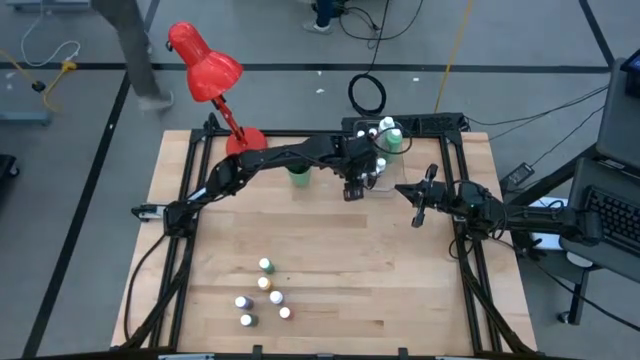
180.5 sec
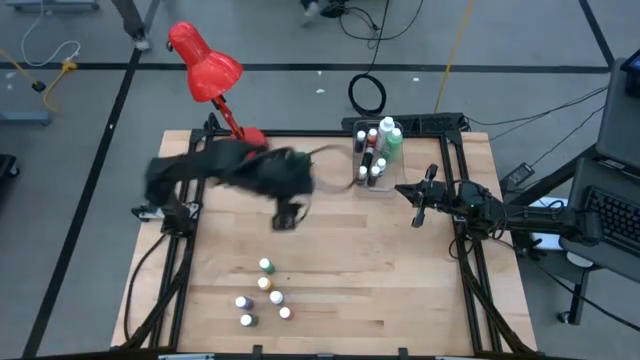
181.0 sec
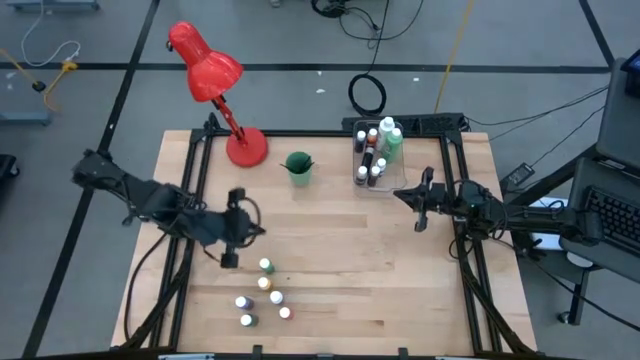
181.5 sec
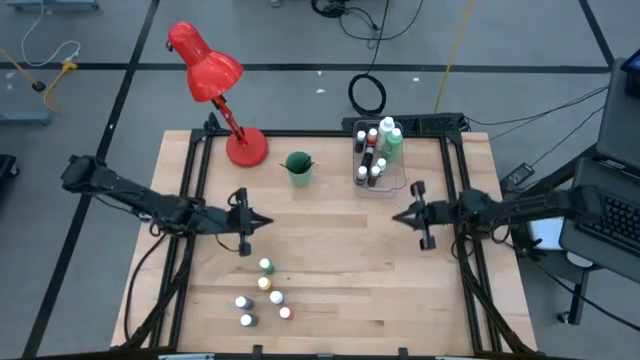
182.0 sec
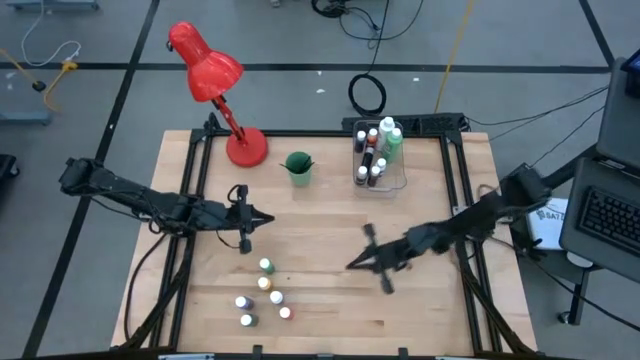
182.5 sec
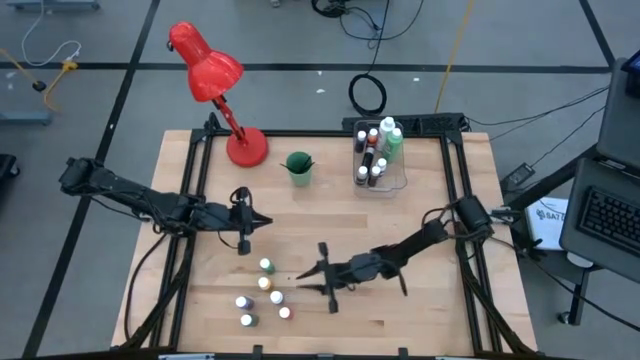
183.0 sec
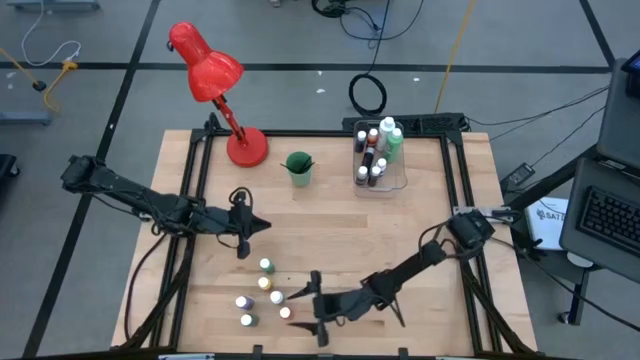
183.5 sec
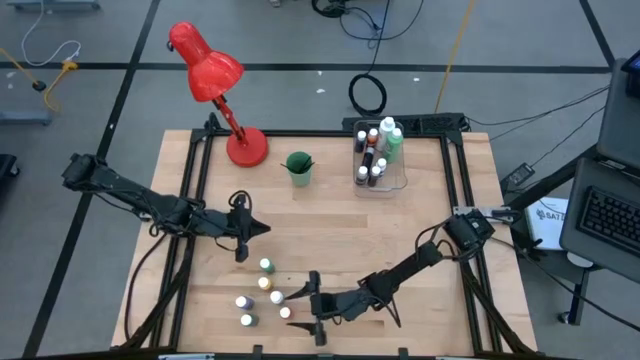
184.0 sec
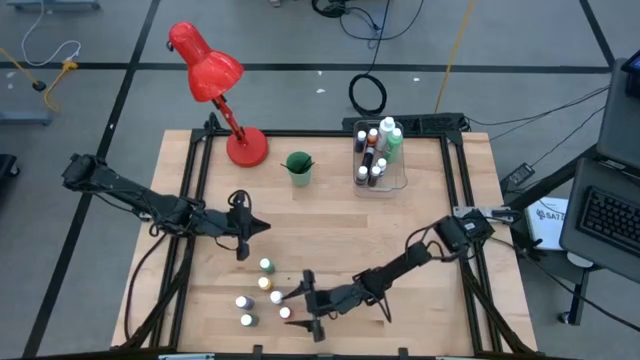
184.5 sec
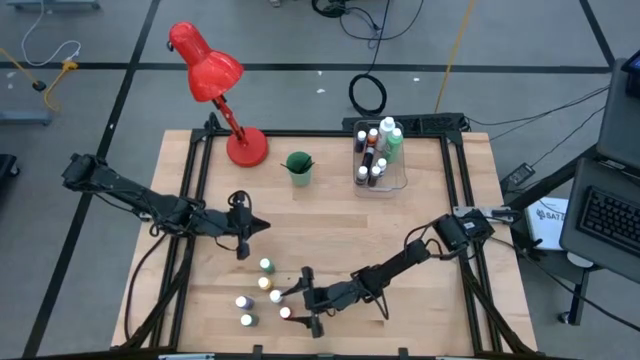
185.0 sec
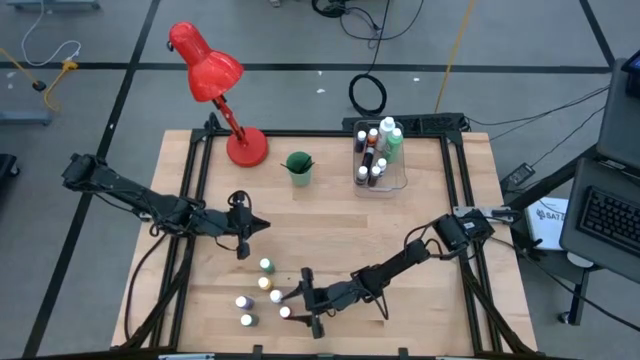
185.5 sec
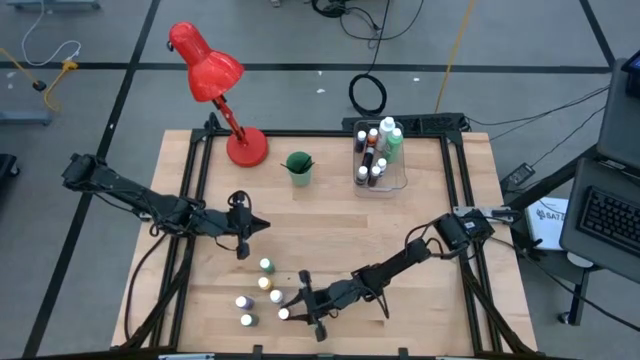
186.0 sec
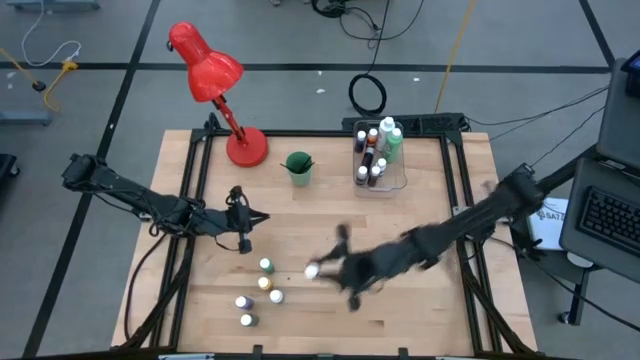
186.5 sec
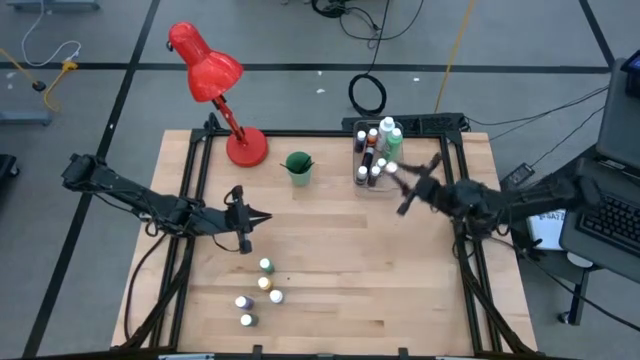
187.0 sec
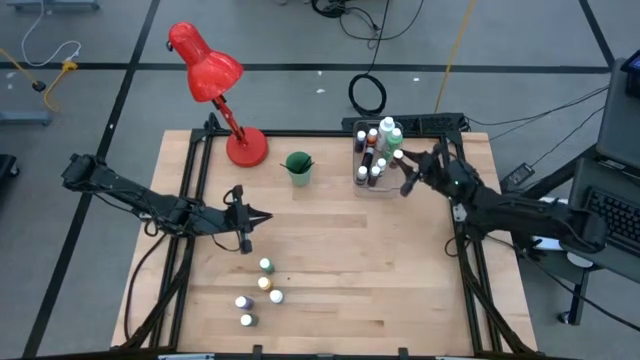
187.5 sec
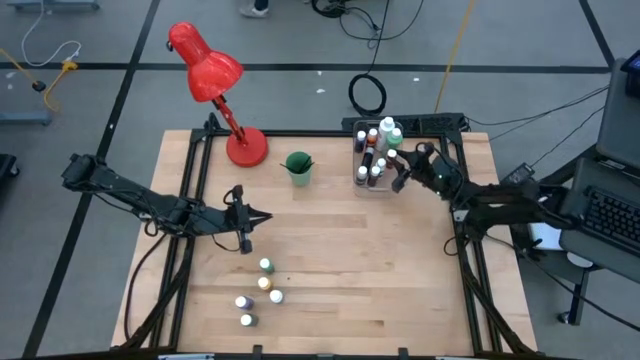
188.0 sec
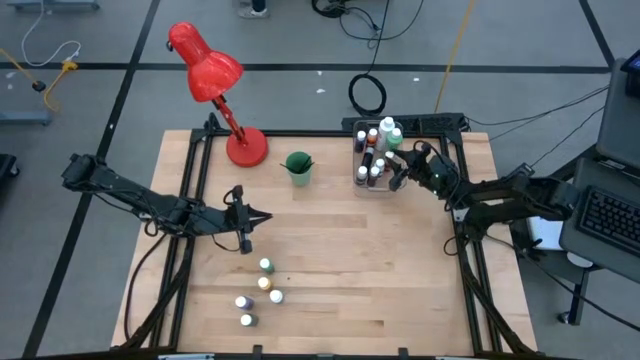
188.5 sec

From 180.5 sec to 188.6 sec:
Task: Pick & Place Paint Supplies
Put the orange paint bottle into the transparent bin

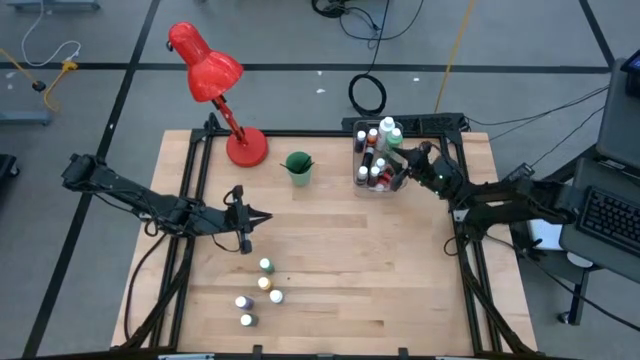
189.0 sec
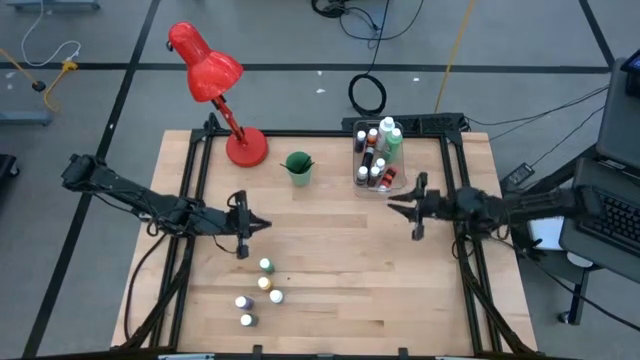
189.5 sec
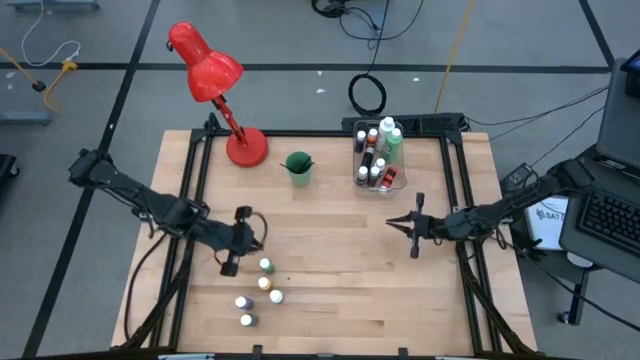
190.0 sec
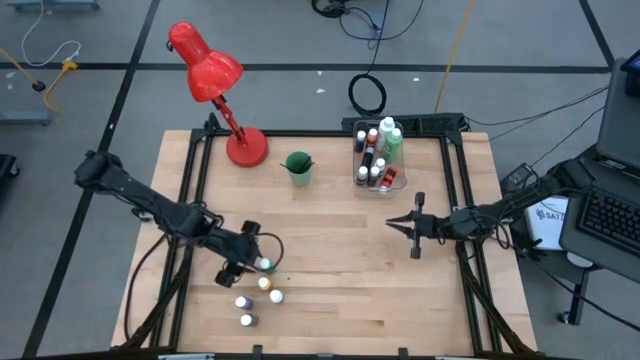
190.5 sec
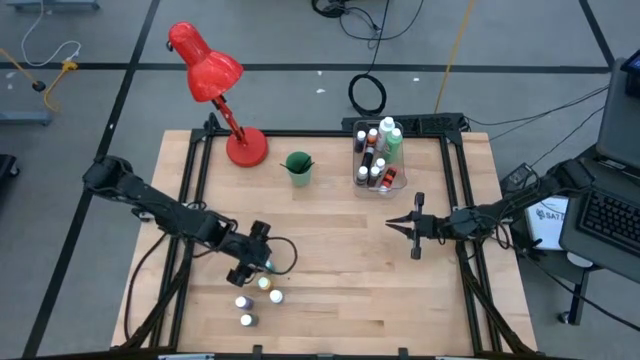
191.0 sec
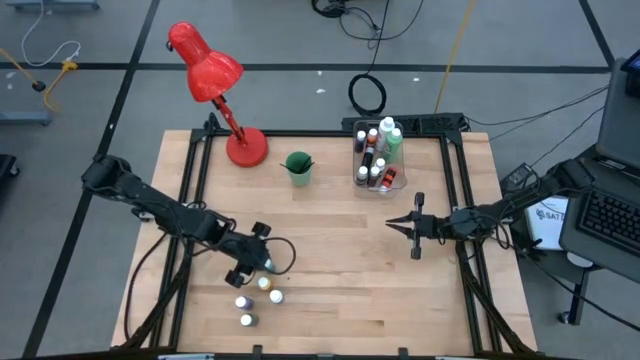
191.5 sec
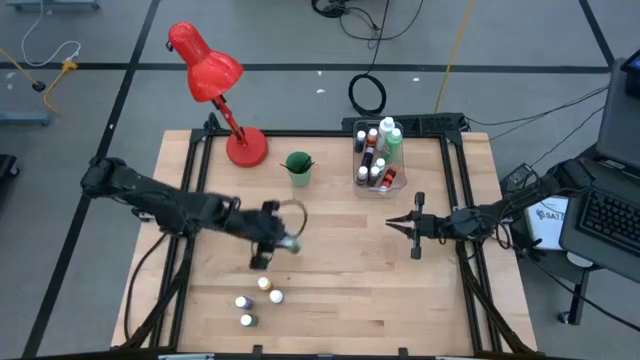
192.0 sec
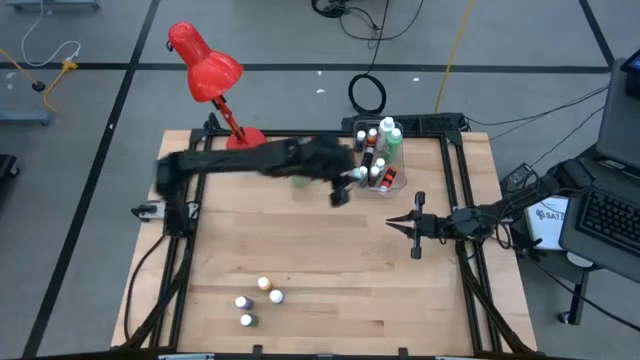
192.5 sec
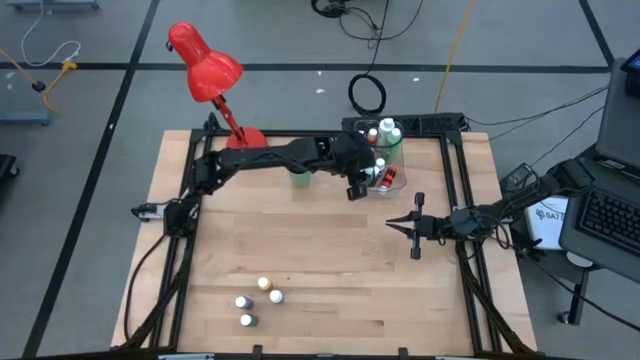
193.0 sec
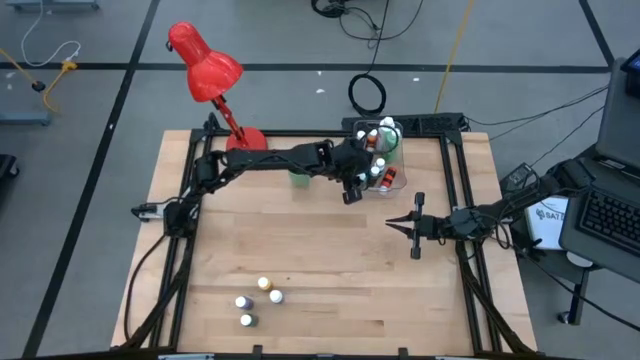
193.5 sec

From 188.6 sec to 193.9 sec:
Put the small green paint bottle into the transparent bin

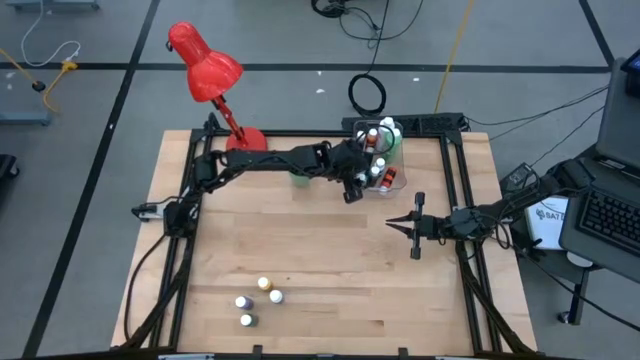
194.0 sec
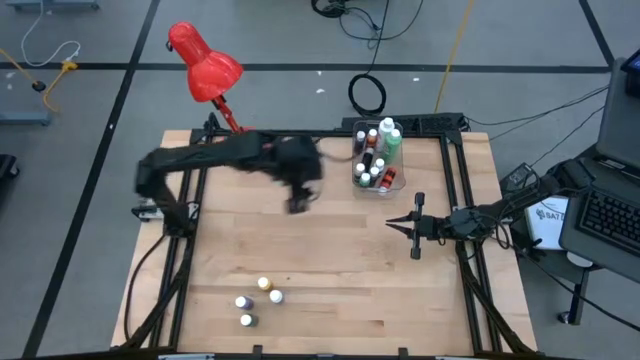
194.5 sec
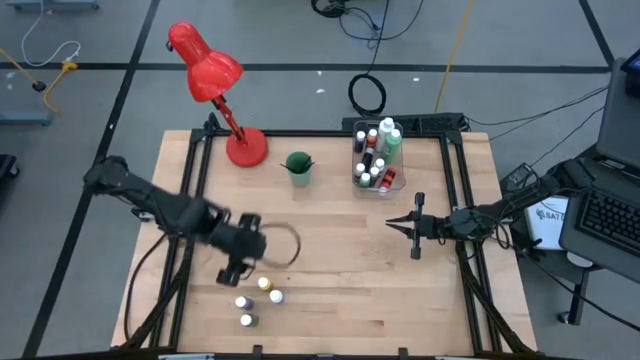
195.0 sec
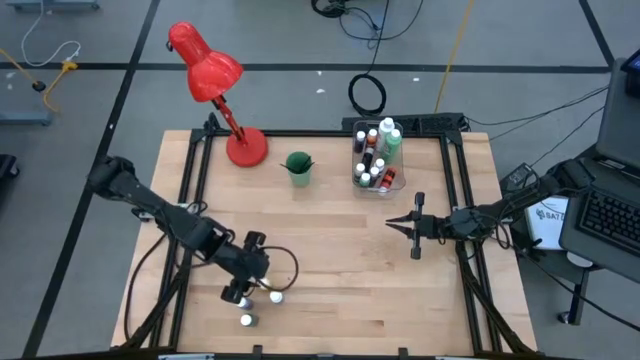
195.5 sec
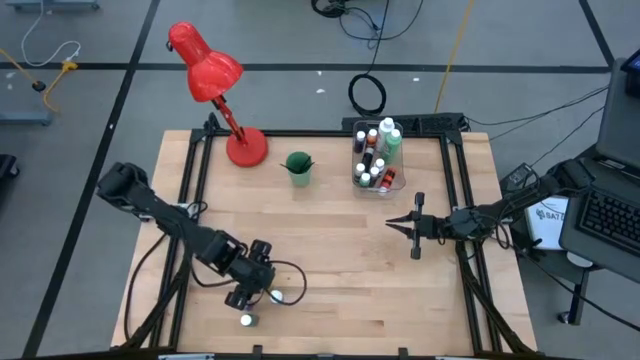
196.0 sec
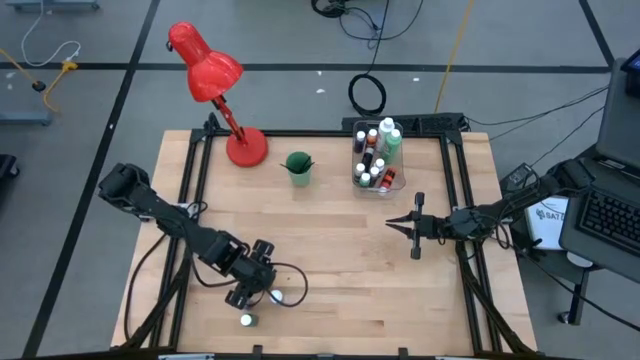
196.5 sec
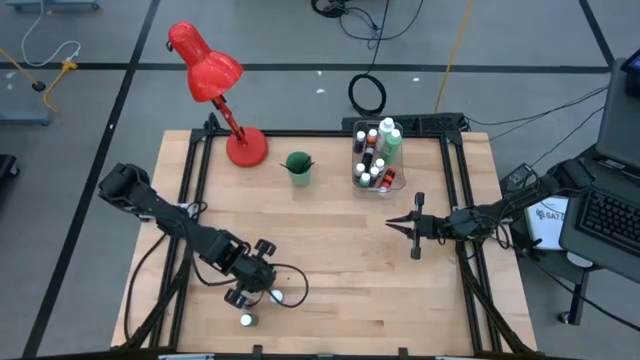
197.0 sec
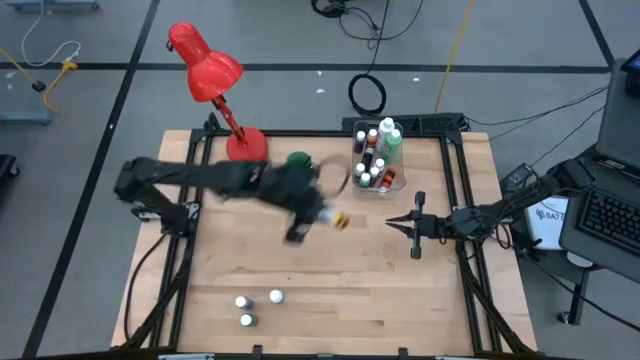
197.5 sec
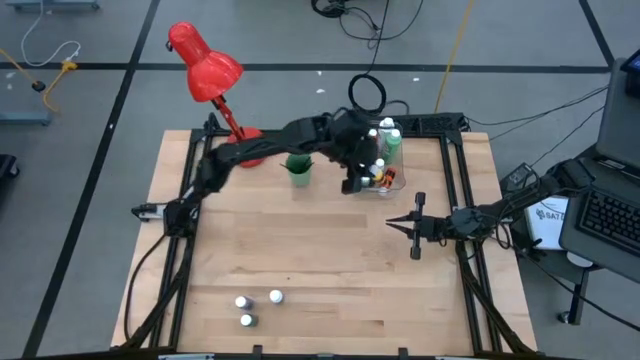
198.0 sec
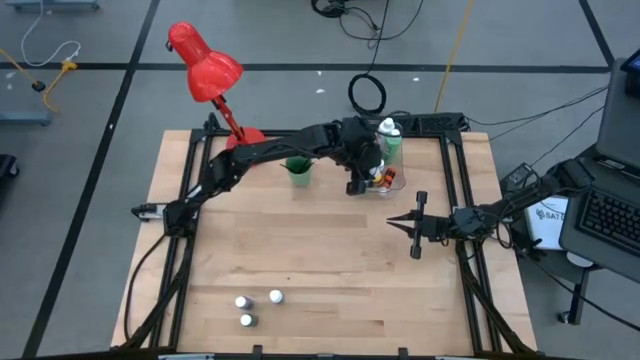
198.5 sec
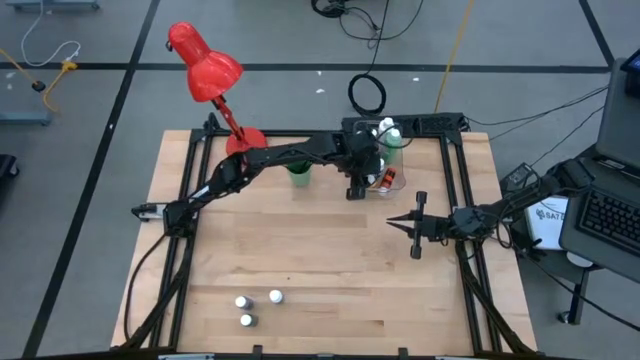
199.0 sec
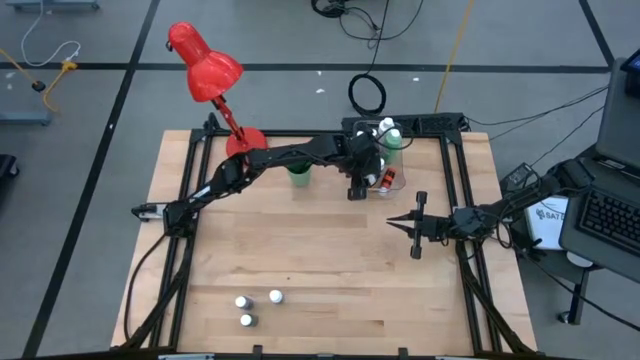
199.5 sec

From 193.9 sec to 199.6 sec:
Put the yellow paint bottle into the transparent bin

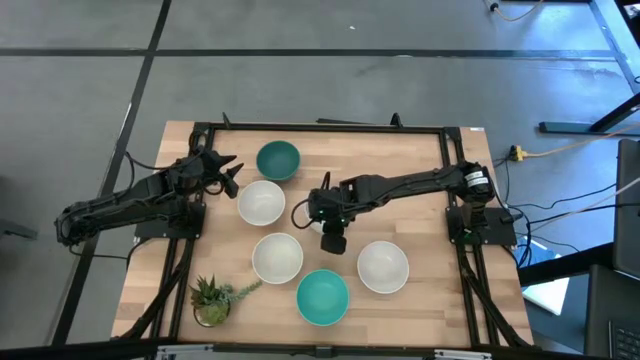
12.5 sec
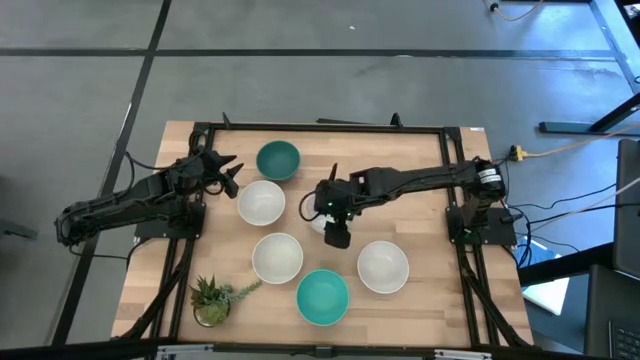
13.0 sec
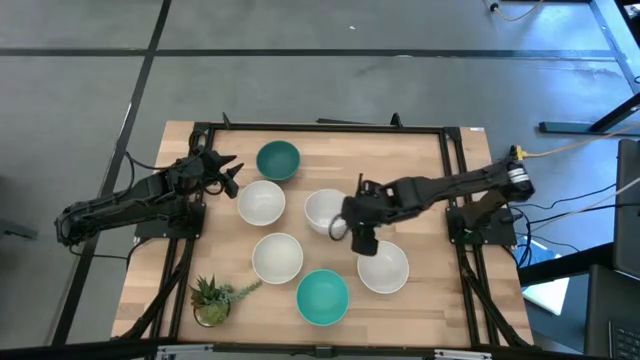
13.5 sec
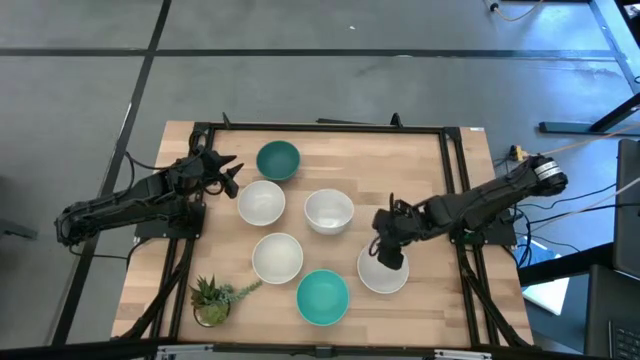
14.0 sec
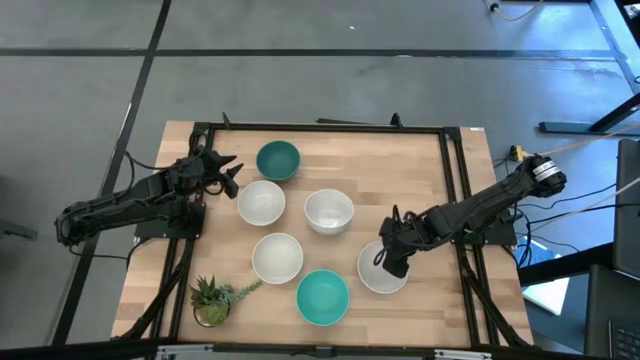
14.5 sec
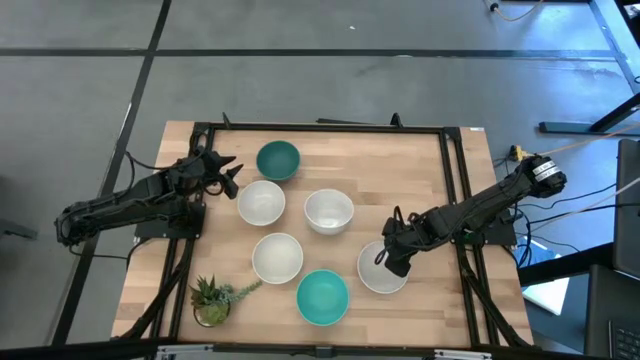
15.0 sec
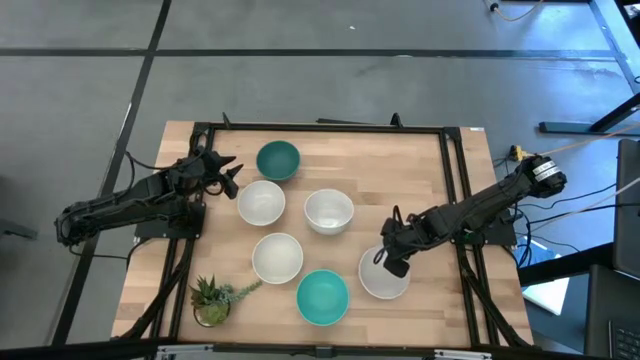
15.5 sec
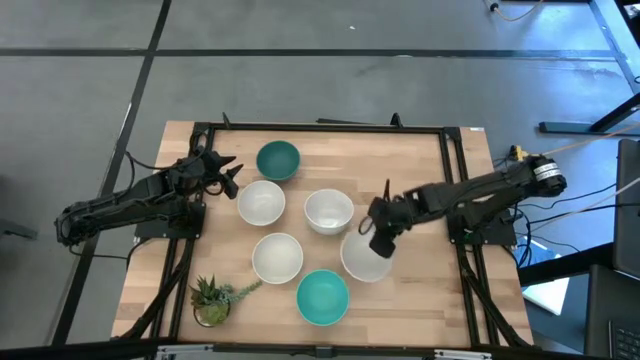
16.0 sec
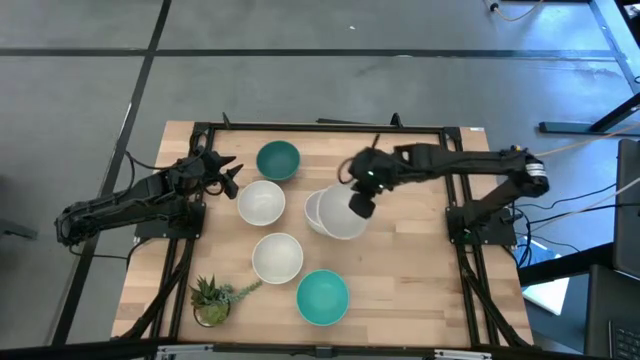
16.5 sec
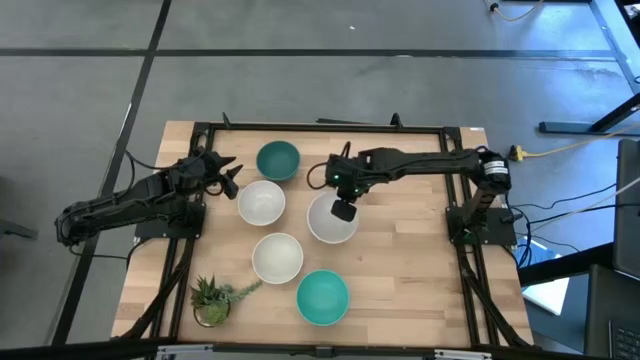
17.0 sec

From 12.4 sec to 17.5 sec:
Task: Nest bowls inside each other
Stack the white bowl on the white bowl
